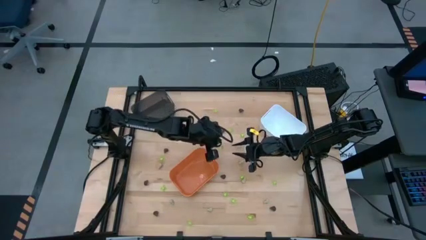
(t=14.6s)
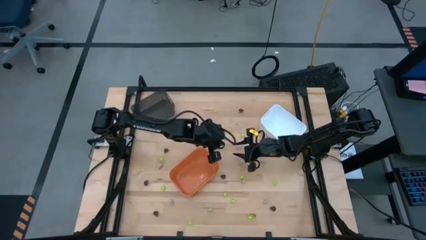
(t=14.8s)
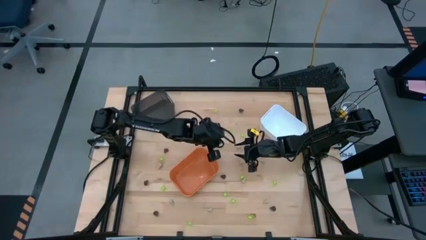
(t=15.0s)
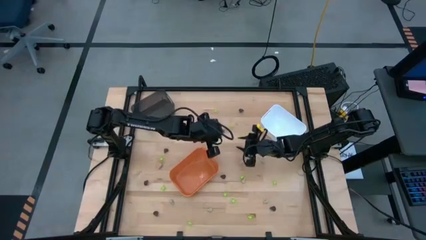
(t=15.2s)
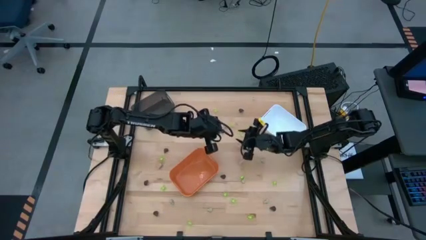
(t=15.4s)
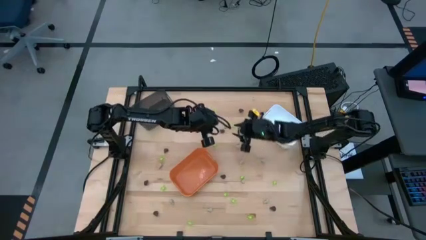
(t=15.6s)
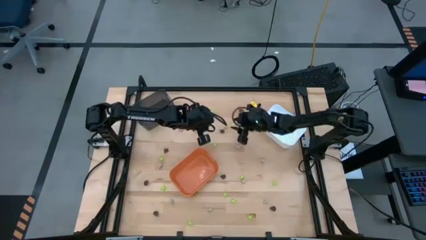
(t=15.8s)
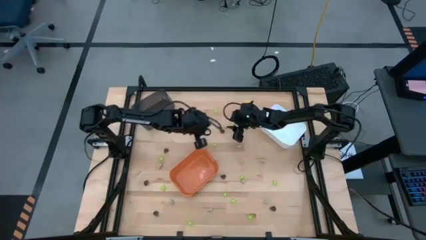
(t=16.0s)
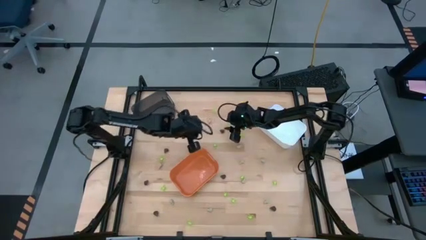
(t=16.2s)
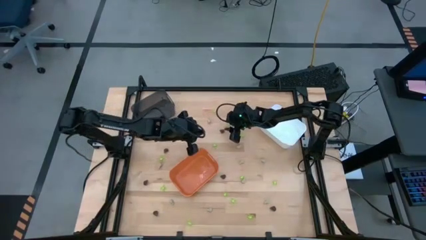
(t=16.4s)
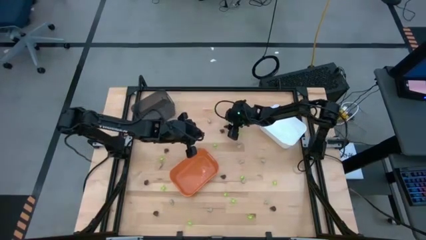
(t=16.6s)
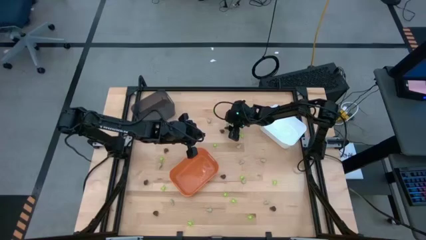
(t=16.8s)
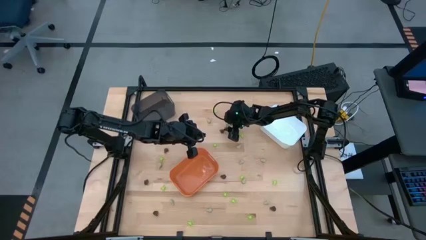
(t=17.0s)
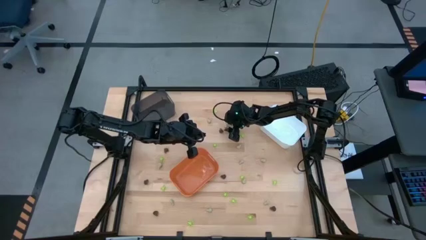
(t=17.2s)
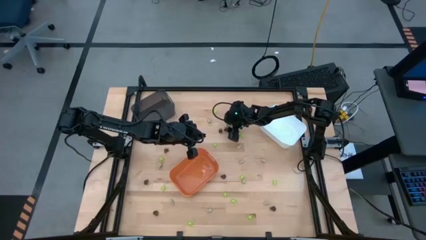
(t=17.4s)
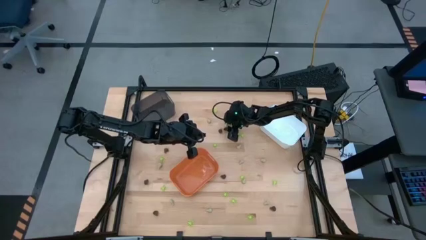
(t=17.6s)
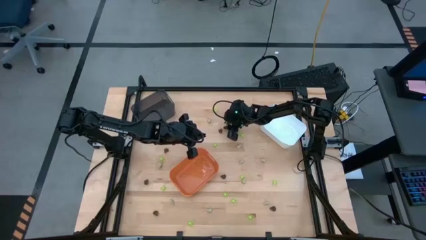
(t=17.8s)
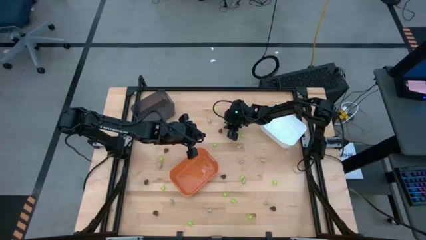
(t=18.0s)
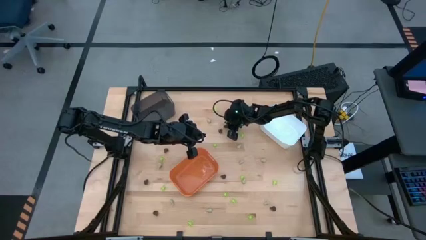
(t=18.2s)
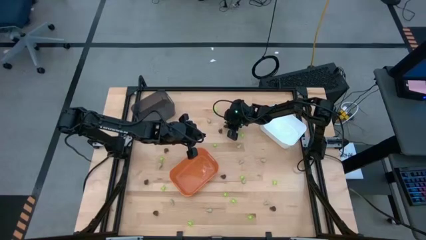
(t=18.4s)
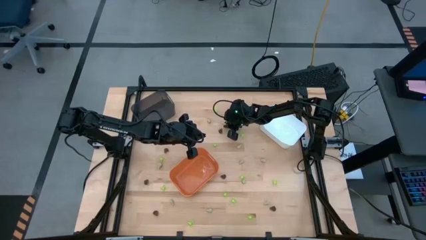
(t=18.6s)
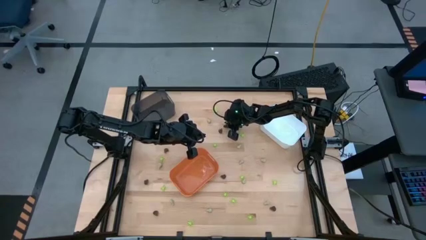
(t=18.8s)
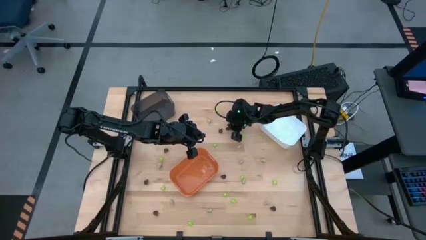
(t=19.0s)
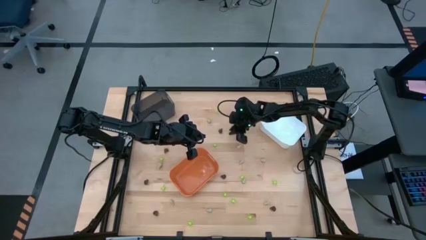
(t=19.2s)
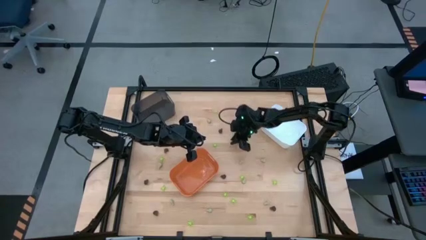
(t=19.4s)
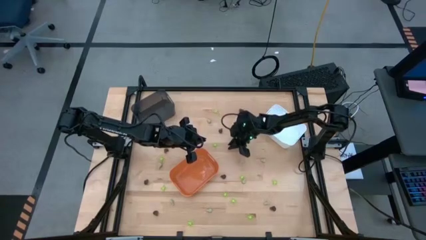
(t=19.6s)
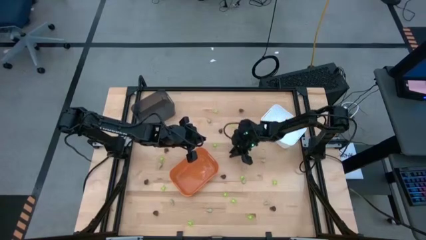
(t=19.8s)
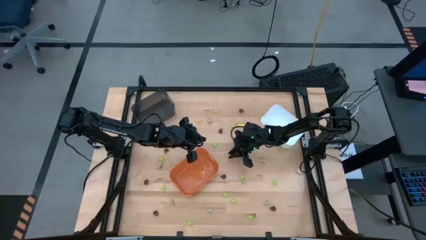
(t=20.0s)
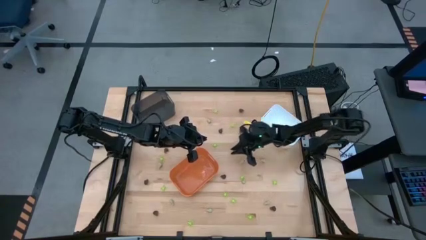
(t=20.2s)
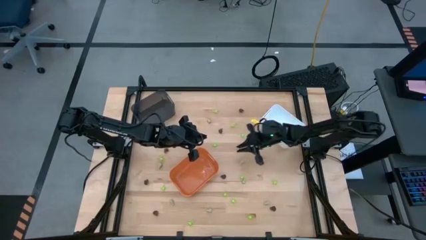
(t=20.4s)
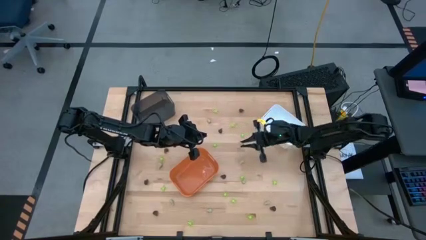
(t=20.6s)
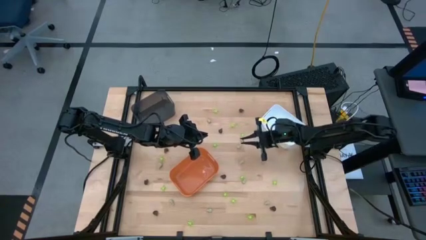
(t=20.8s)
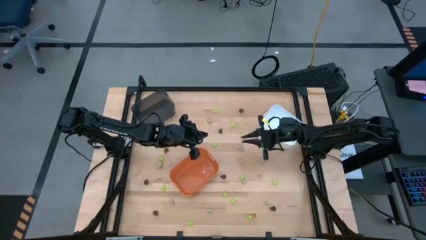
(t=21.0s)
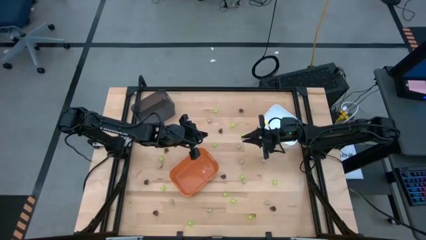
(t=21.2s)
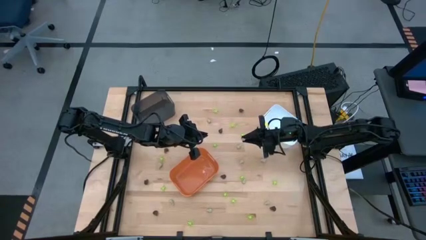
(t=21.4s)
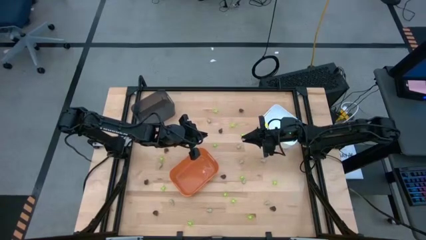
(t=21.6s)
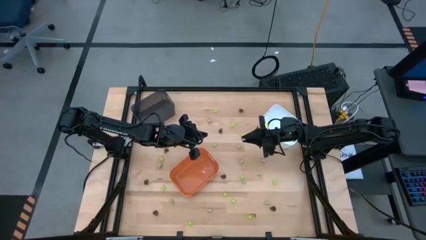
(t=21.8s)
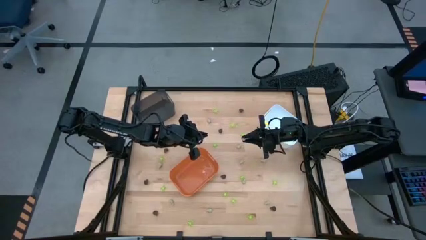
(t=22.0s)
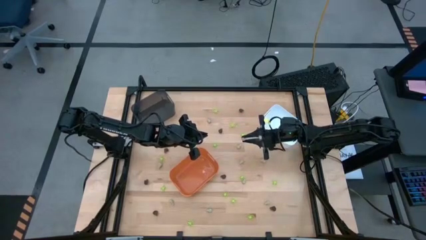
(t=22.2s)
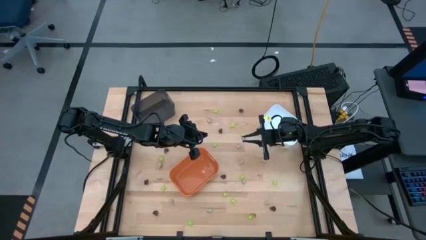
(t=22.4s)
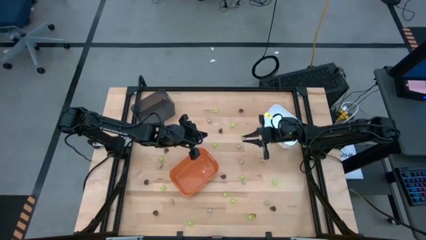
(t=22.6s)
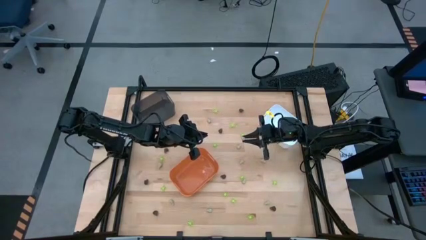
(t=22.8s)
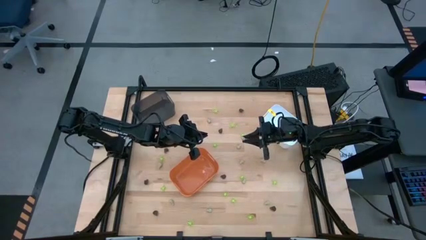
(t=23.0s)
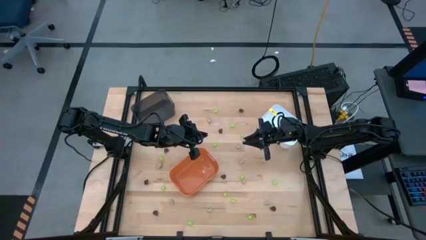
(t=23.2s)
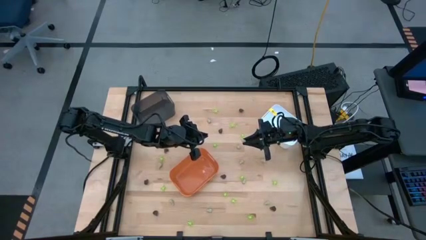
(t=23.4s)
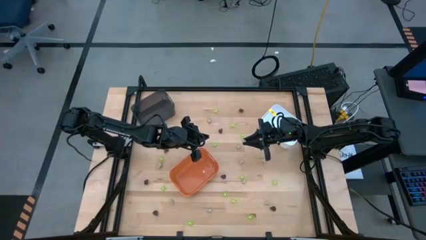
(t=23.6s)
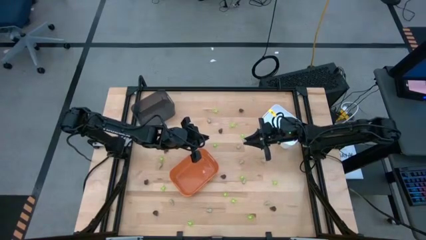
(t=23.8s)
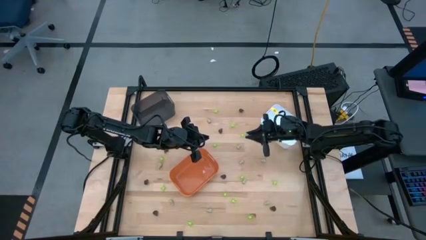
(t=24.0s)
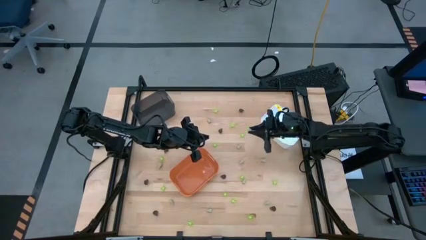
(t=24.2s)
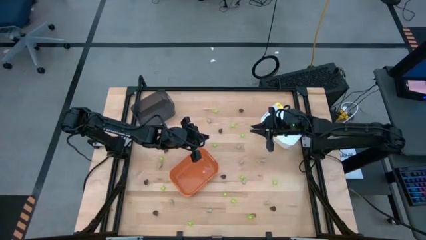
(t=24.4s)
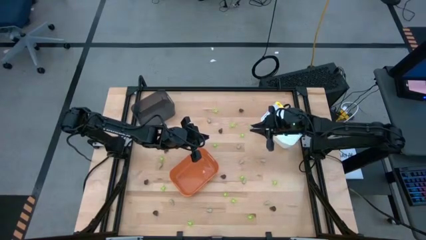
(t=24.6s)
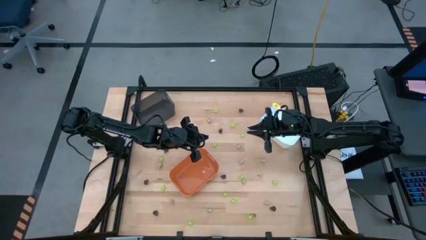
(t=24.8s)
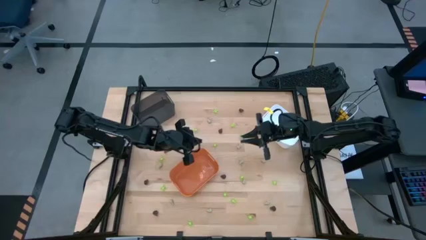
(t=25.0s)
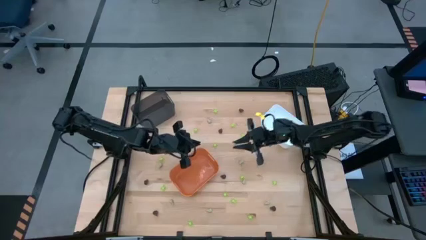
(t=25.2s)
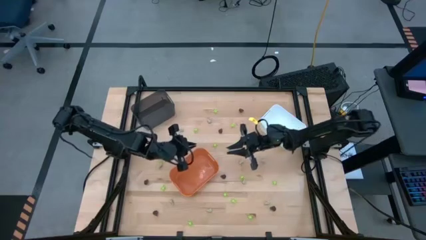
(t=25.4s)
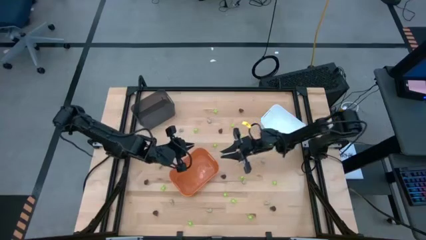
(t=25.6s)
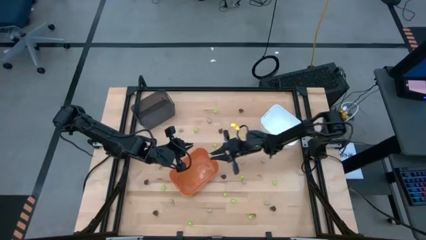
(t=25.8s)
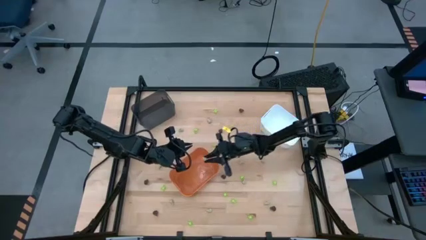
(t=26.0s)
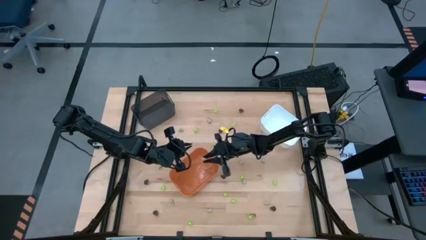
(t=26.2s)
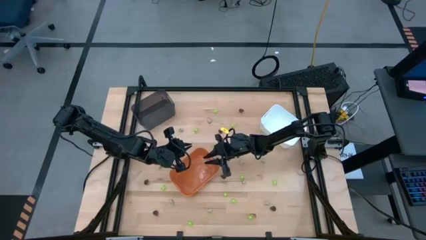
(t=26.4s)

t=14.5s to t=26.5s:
Task: Sort Halloween decoration
Put the small white skull toy into the orange bin
